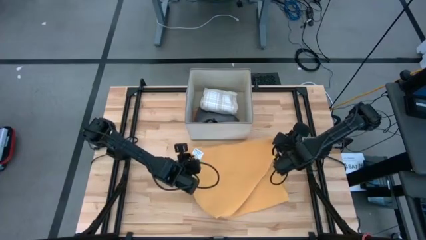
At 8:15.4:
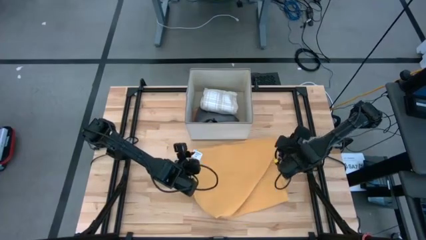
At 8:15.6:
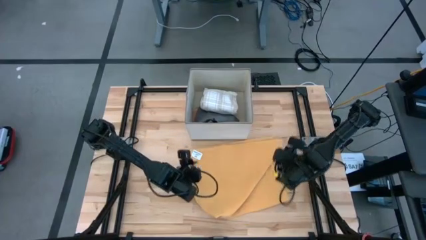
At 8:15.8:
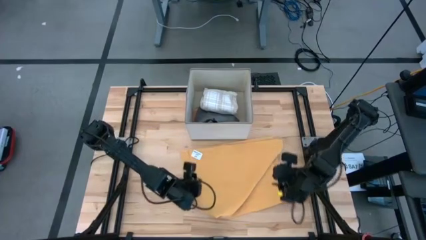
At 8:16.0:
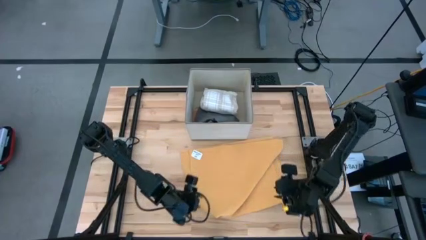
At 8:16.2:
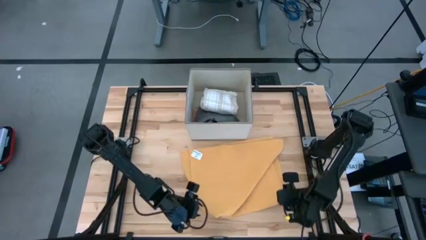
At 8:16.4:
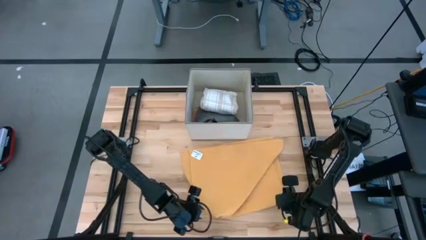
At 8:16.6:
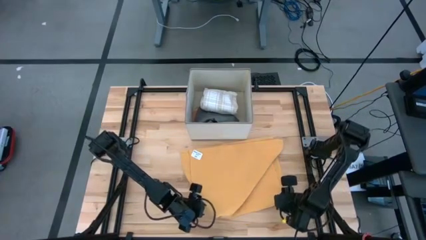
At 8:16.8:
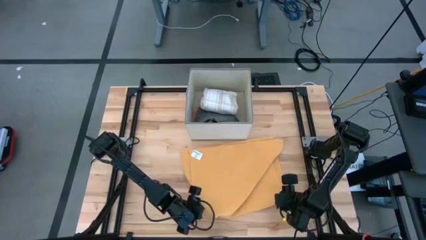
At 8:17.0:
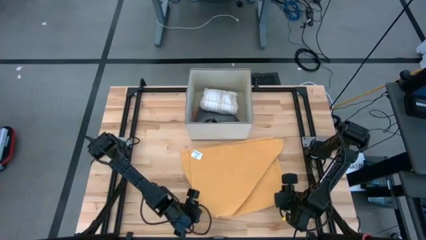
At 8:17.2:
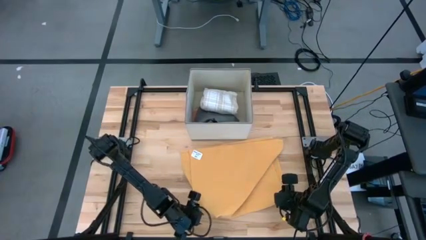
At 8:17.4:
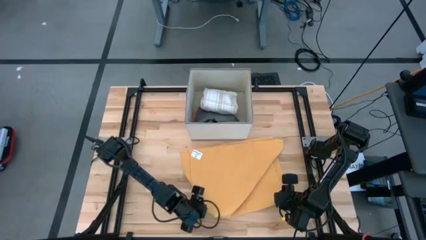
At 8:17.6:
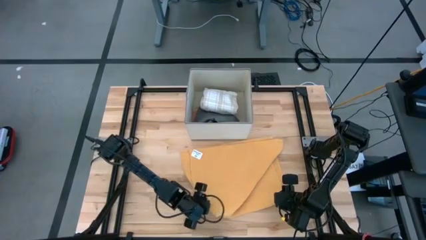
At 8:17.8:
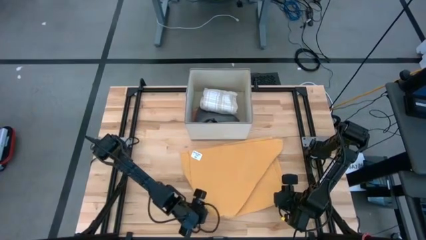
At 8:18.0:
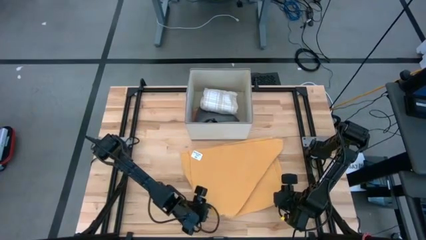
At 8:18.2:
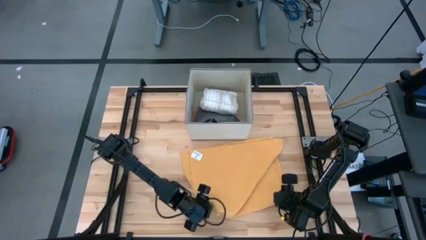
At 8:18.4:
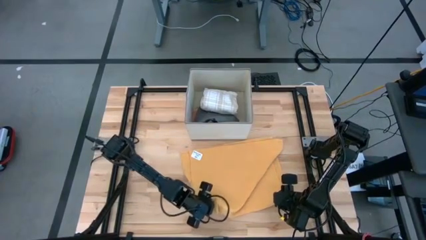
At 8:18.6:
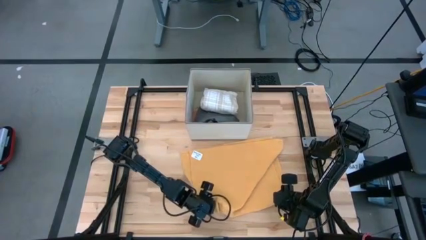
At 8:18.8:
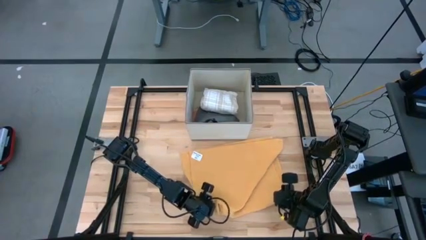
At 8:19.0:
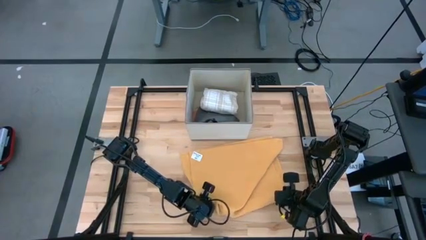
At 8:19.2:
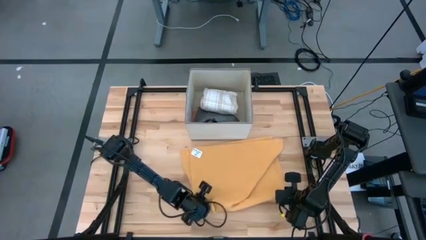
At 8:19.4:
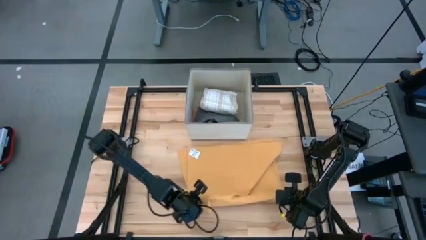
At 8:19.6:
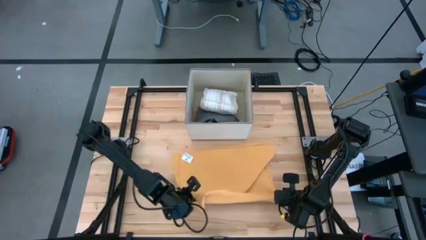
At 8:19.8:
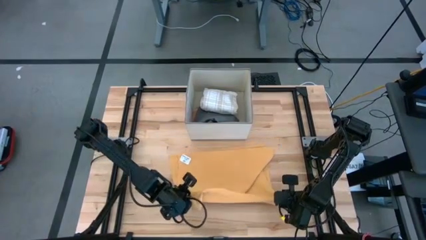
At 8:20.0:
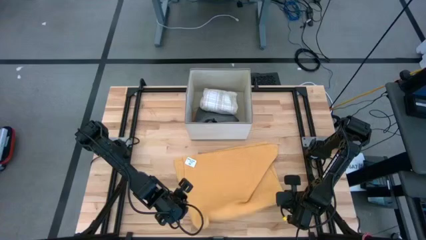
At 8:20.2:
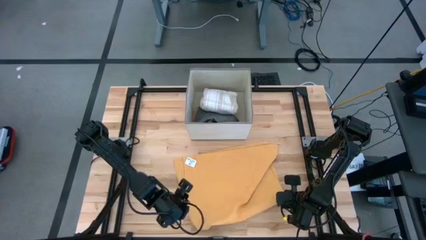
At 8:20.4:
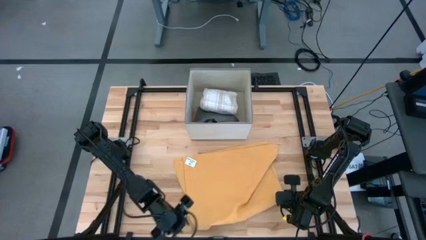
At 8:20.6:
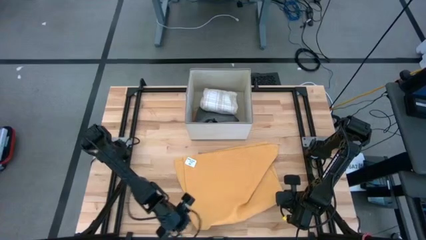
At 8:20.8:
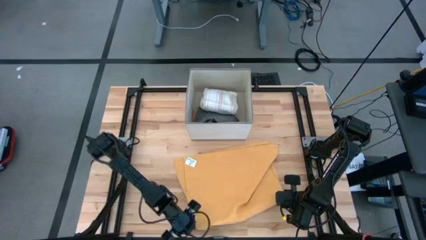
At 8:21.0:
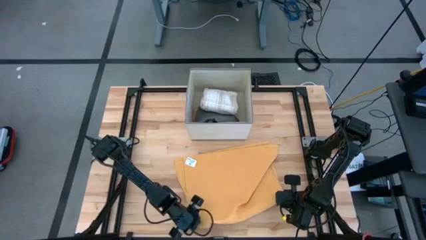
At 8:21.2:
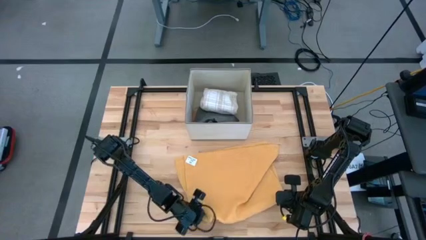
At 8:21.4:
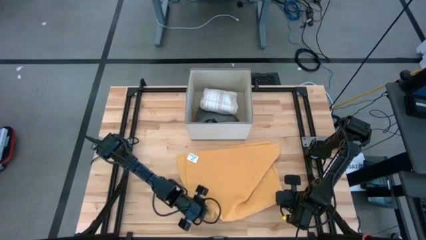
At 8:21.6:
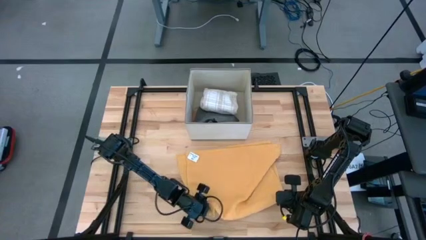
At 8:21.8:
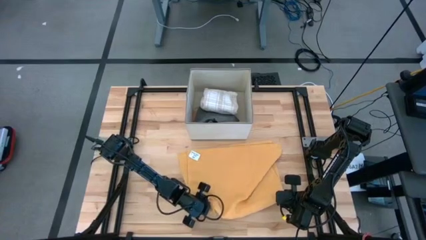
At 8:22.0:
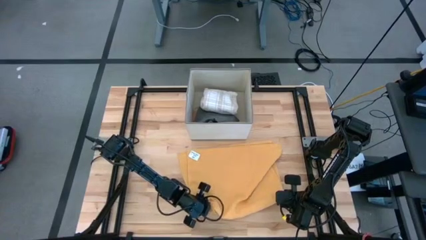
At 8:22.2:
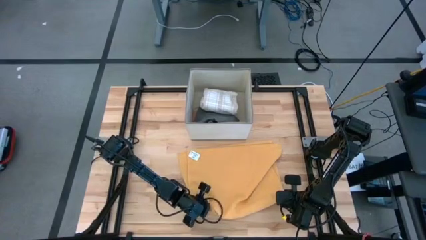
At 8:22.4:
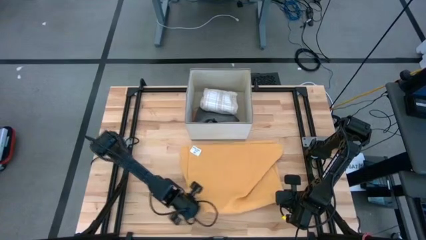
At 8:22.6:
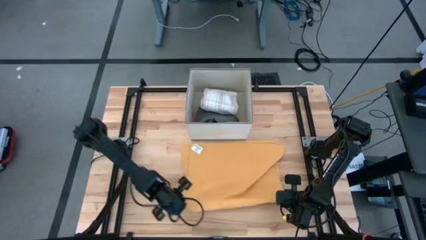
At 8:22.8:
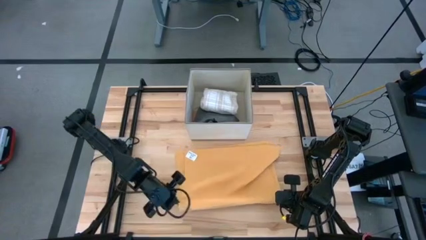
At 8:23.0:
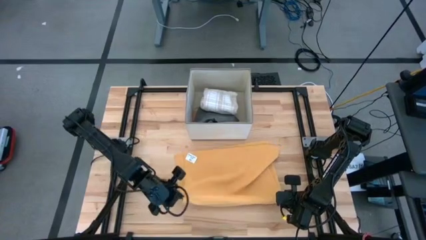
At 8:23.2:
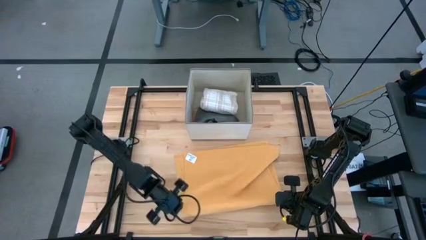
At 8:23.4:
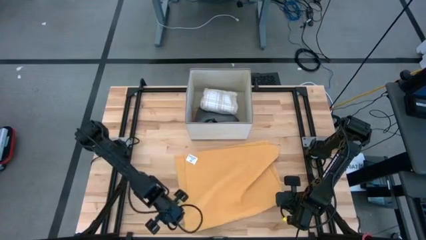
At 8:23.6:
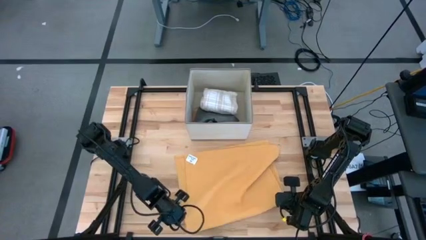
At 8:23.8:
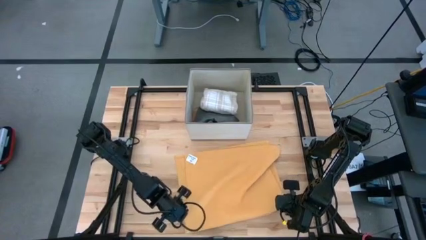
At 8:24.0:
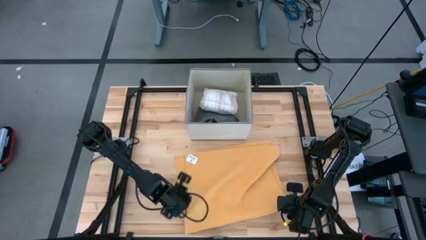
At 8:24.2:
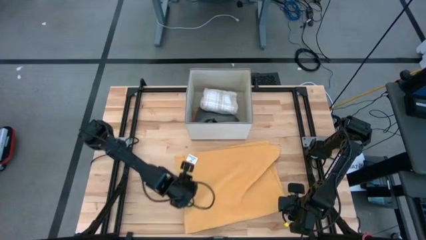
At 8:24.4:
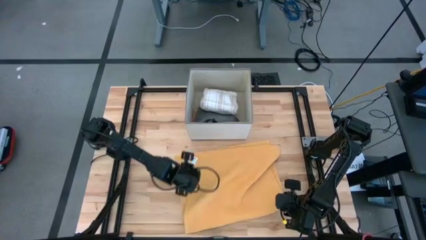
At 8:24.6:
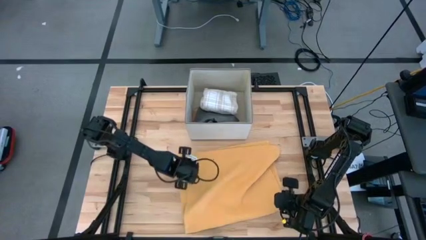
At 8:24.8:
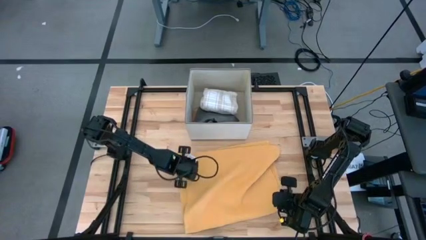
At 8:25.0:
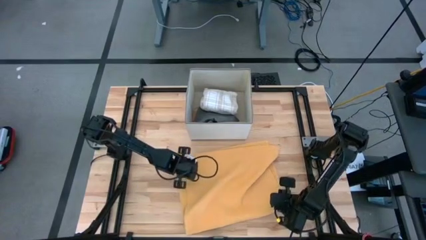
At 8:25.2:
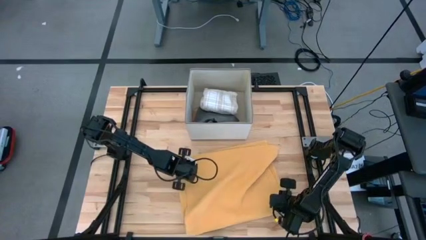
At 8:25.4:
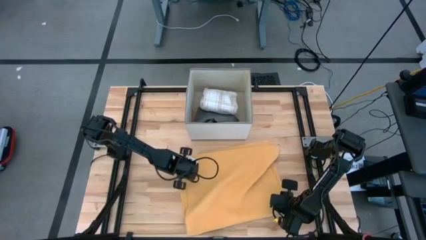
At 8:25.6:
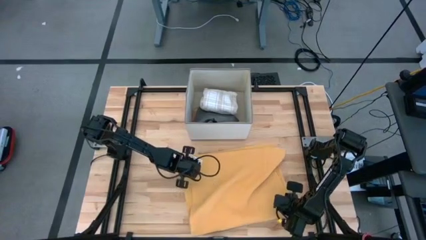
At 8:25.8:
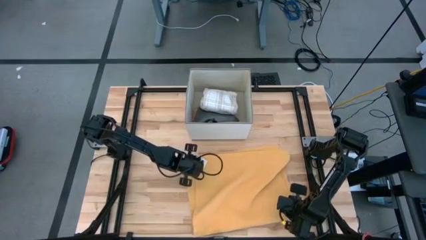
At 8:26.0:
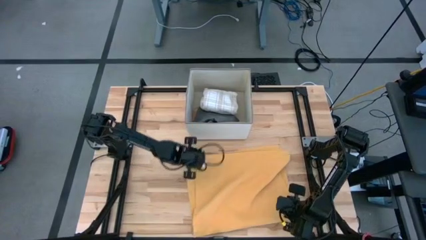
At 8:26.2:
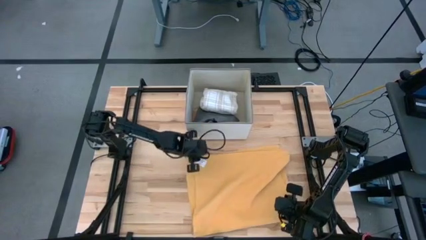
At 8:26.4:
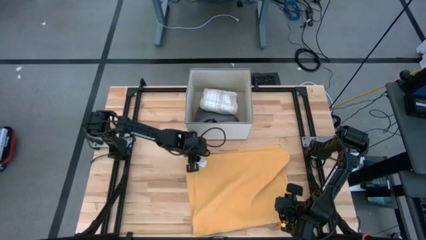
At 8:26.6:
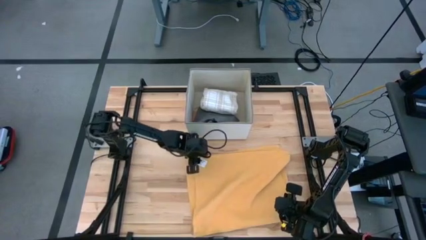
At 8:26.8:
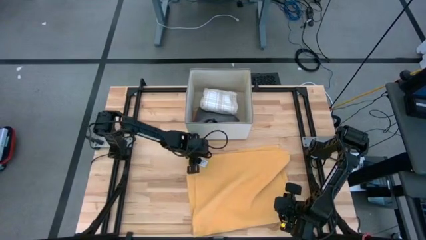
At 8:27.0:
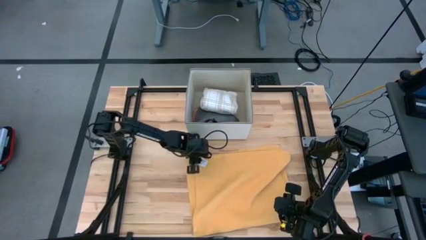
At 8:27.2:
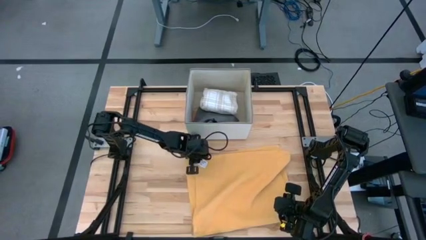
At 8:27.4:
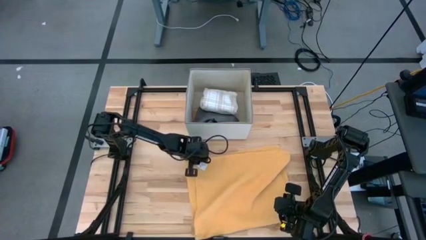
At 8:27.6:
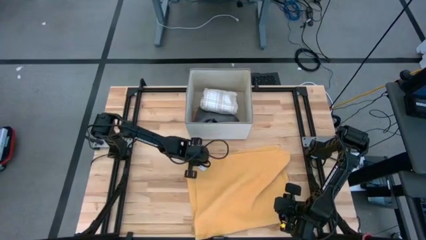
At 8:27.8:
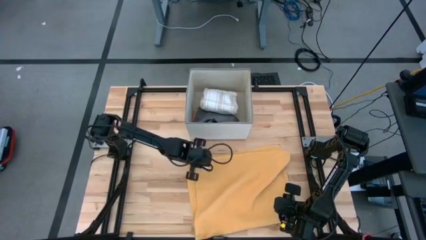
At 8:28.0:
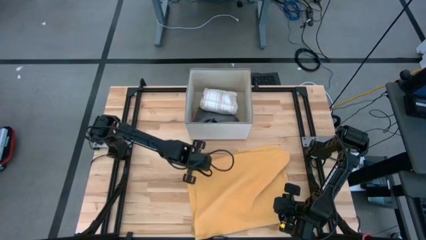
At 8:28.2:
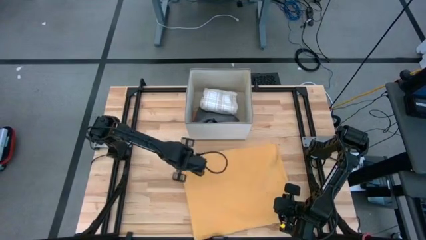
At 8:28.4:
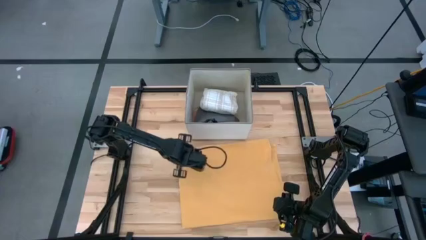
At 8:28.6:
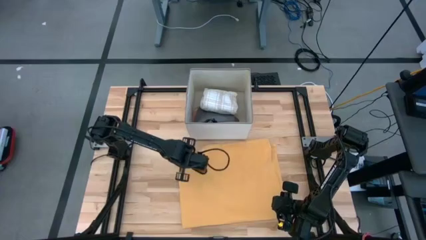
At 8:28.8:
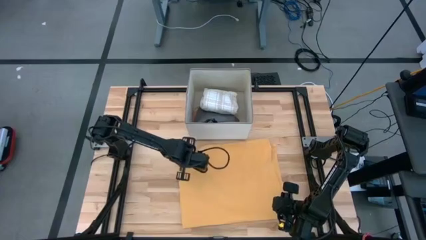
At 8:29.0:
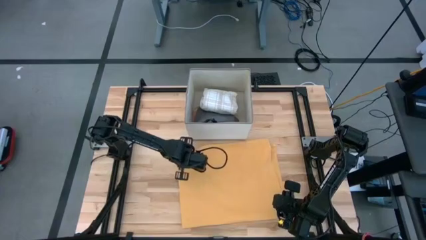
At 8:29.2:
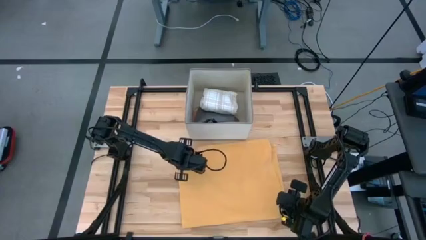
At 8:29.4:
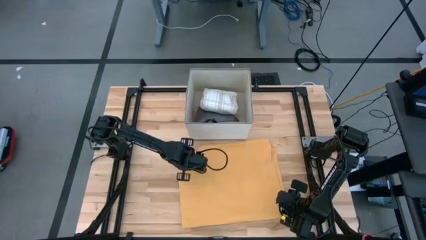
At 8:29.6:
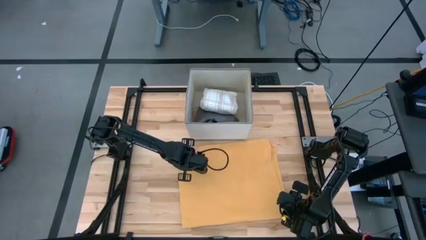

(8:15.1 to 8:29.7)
Task: Fold towel
Fold the orange towel
